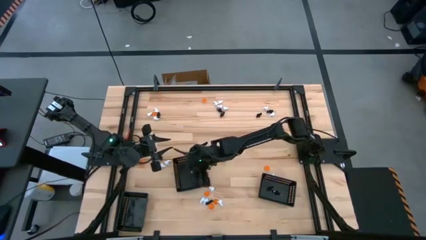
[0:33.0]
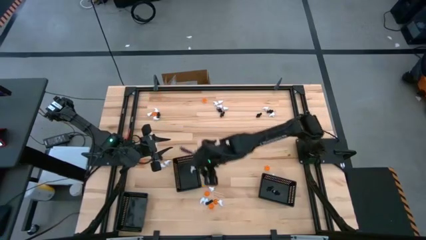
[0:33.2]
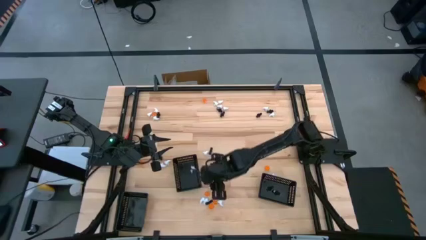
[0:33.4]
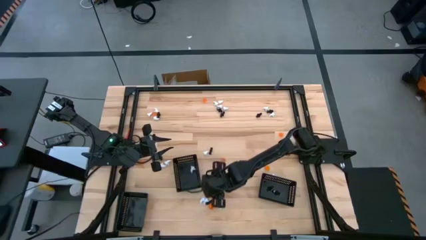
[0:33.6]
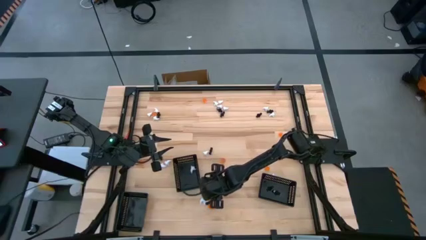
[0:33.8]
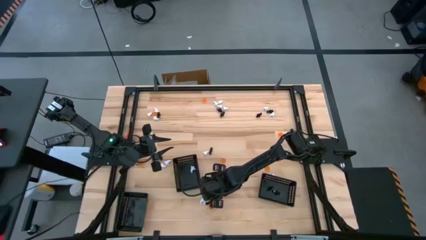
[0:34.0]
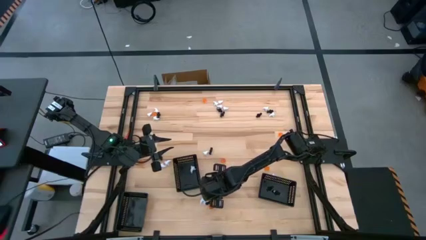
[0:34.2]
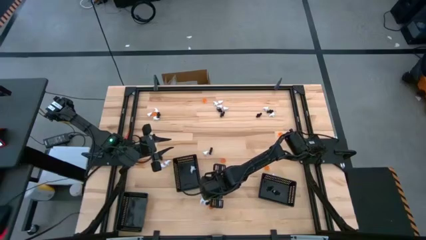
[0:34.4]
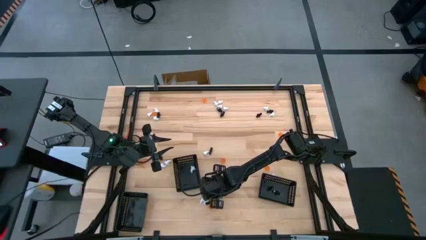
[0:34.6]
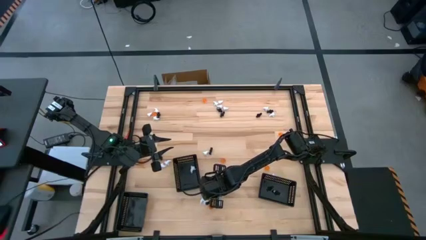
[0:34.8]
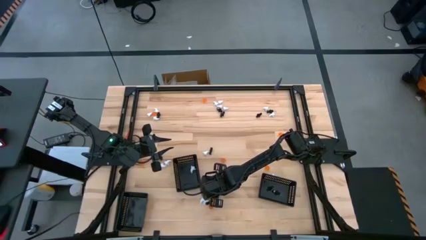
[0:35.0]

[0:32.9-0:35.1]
Task: Sort Halloween decoration
Put the white ghost toy into the middle black basket

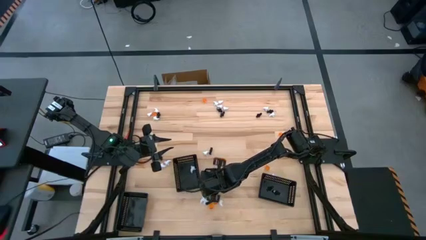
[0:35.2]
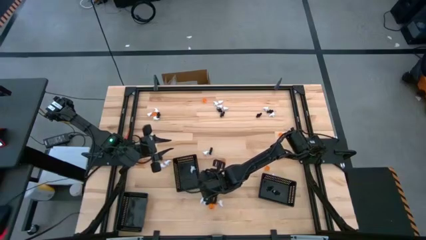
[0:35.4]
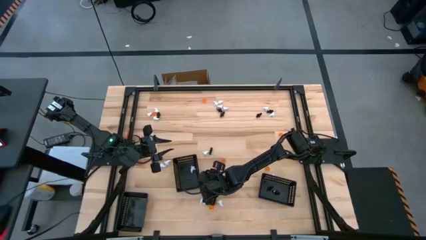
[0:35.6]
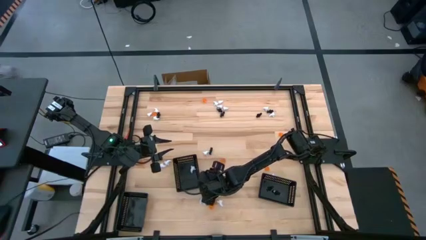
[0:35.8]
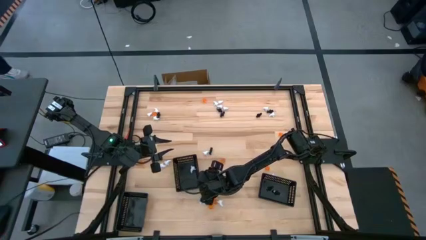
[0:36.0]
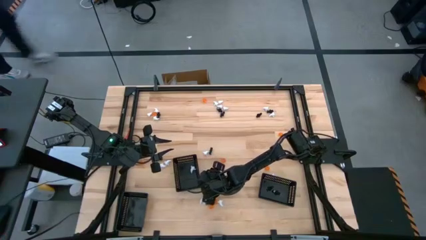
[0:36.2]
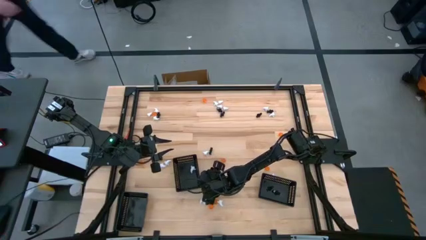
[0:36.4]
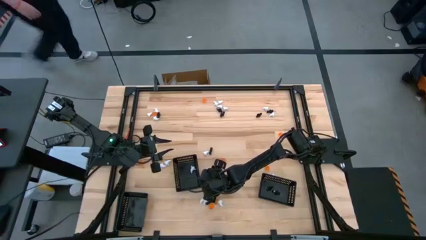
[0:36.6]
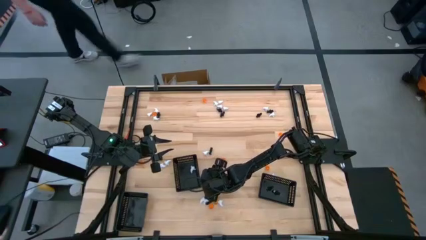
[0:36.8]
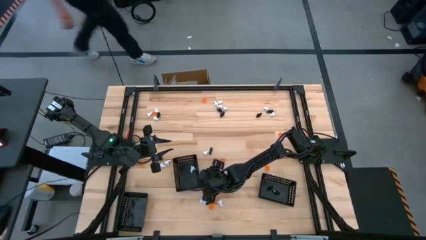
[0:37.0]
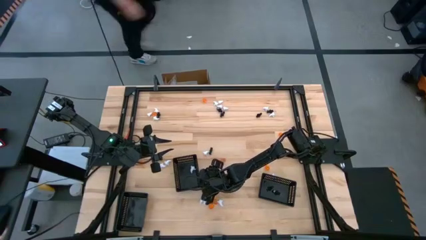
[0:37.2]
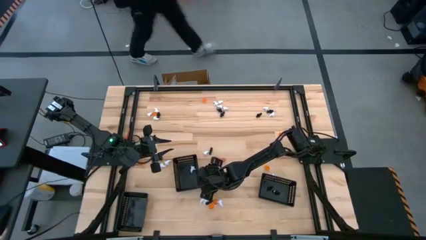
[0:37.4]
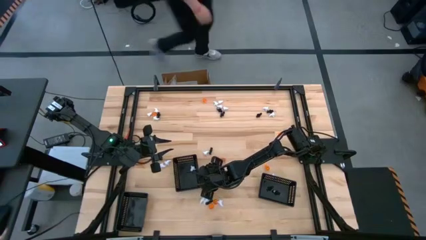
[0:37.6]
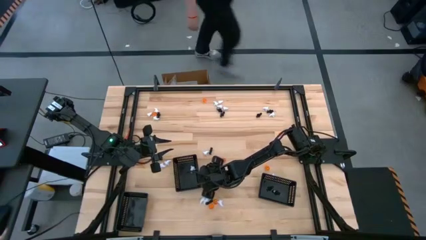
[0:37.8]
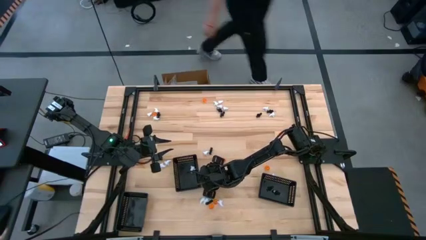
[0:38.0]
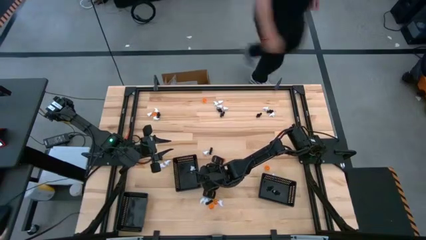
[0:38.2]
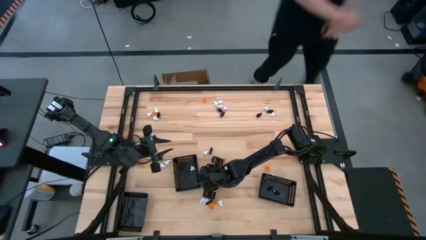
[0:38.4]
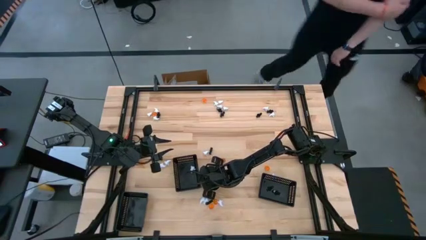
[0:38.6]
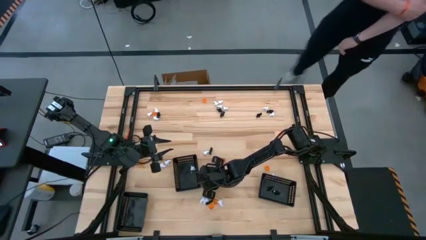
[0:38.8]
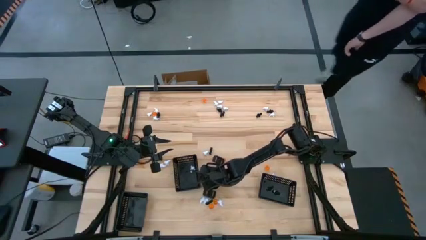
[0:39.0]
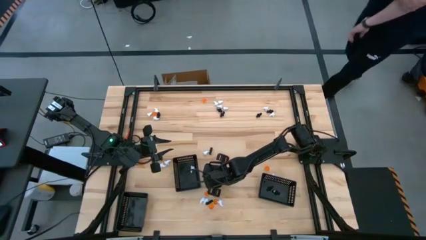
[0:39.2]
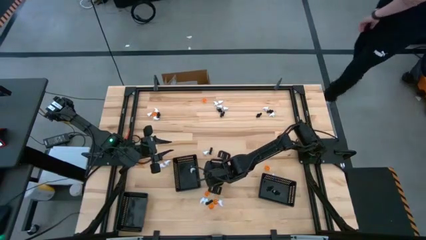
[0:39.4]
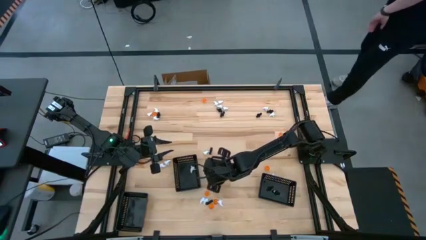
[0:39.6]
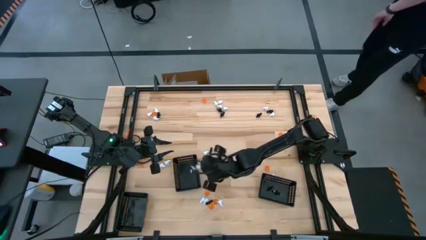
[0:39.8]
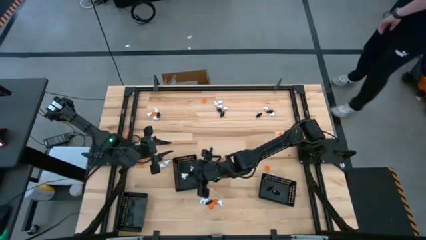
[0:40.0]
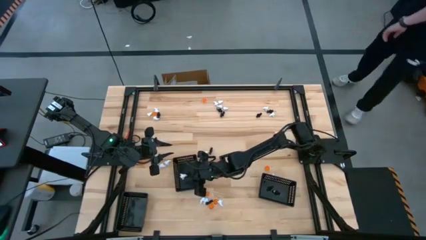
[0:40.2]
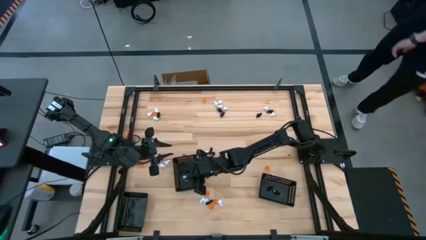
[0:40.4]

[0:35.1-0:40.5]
Put the white ghost toy into the middle black basket

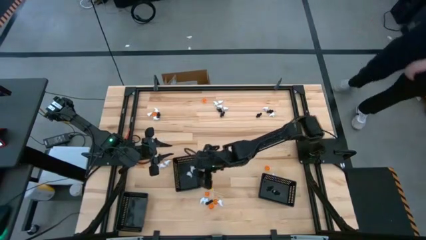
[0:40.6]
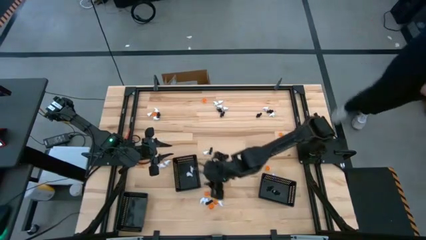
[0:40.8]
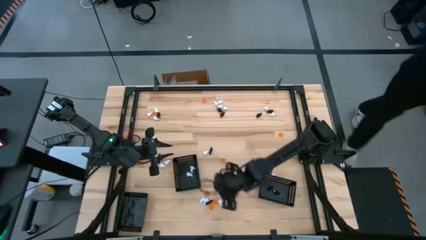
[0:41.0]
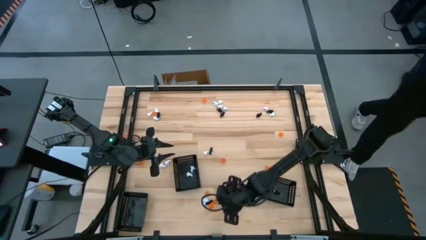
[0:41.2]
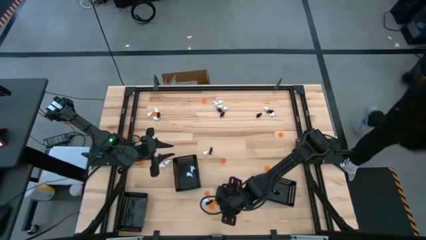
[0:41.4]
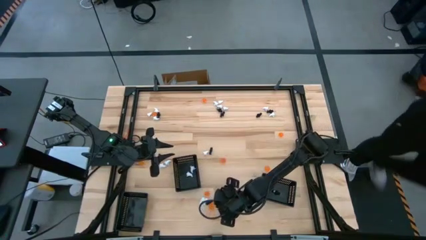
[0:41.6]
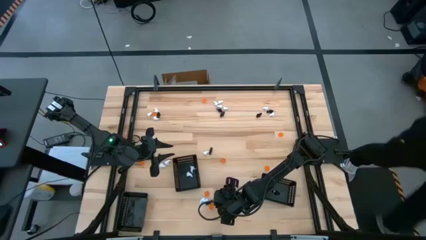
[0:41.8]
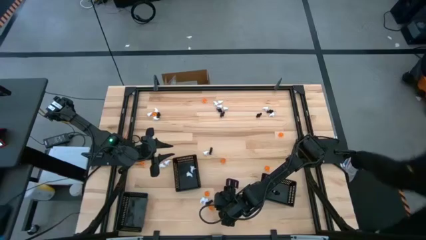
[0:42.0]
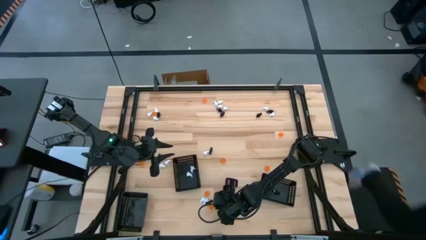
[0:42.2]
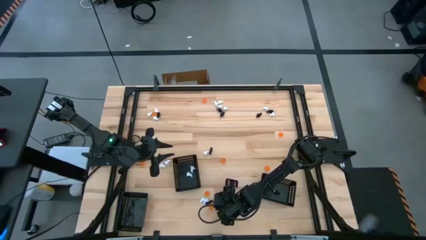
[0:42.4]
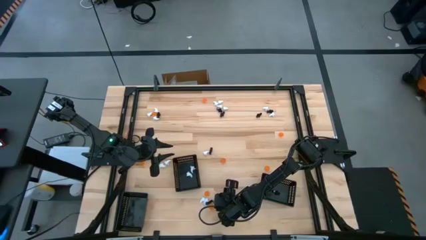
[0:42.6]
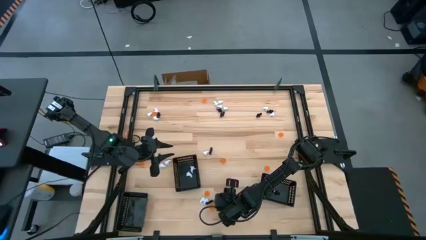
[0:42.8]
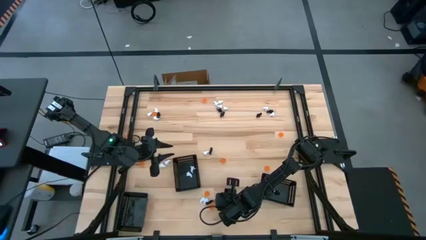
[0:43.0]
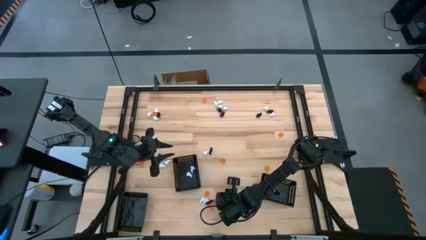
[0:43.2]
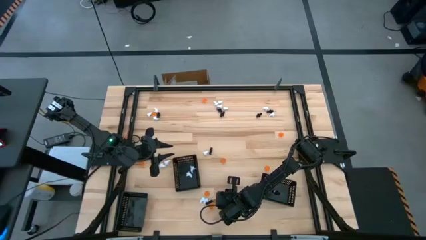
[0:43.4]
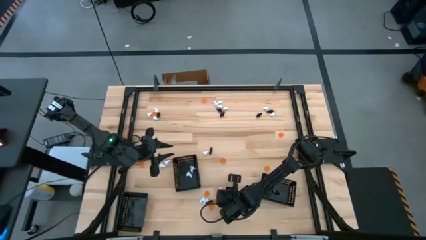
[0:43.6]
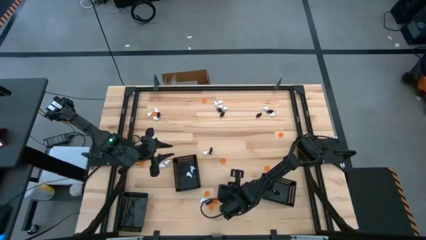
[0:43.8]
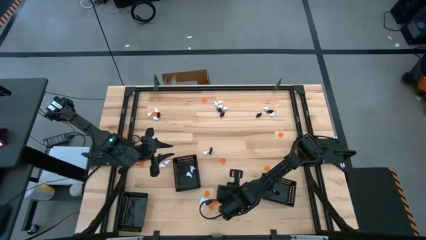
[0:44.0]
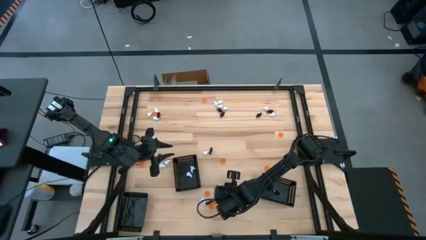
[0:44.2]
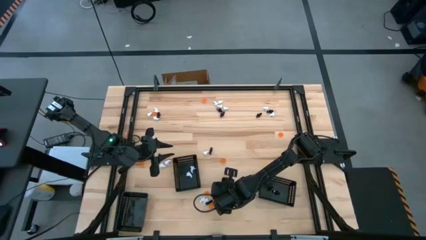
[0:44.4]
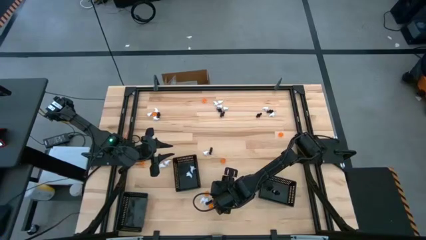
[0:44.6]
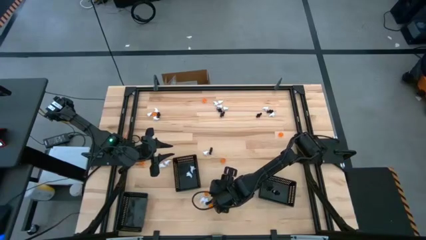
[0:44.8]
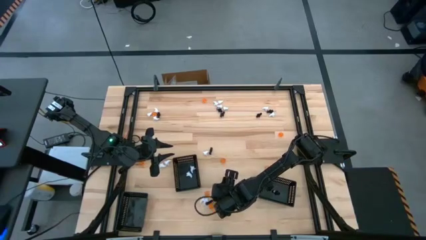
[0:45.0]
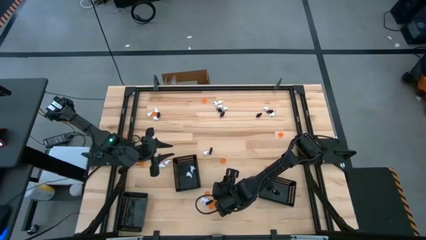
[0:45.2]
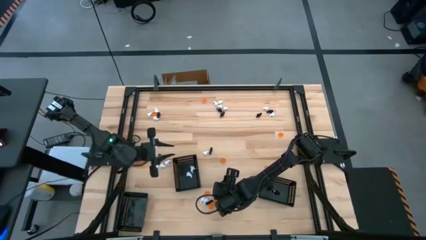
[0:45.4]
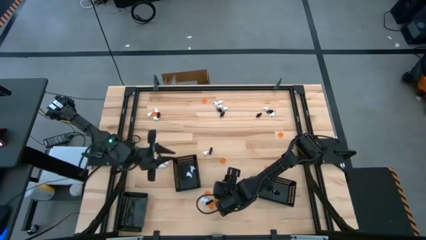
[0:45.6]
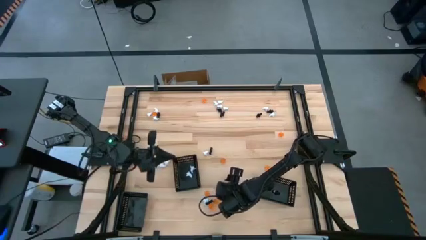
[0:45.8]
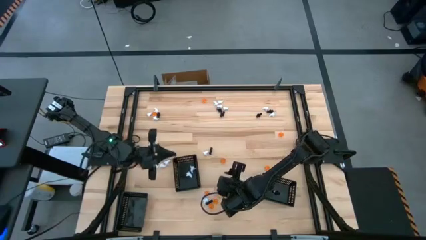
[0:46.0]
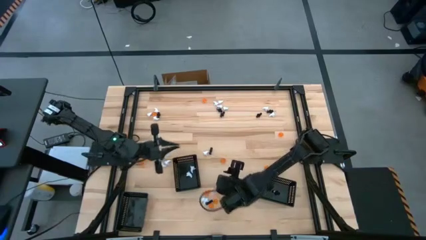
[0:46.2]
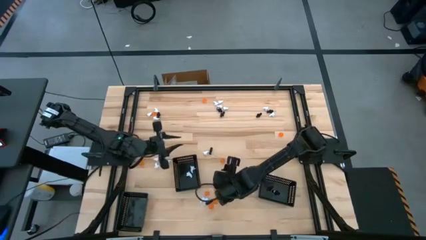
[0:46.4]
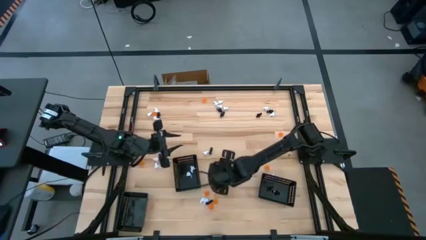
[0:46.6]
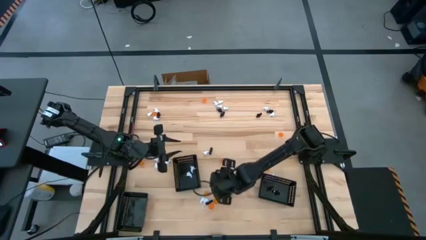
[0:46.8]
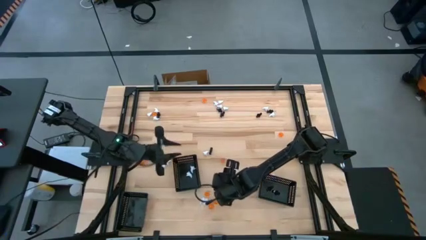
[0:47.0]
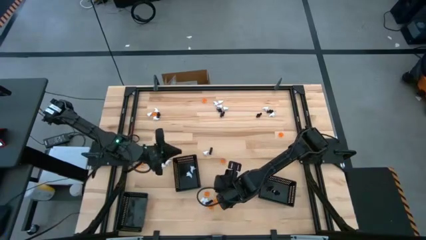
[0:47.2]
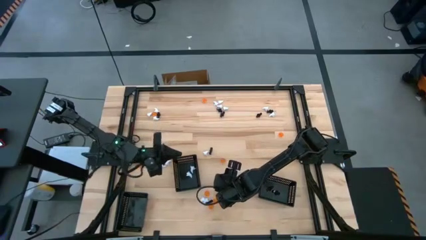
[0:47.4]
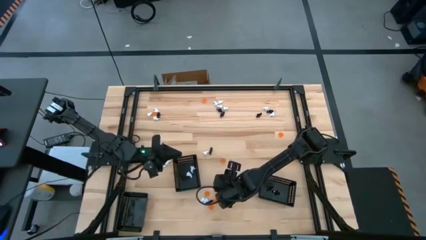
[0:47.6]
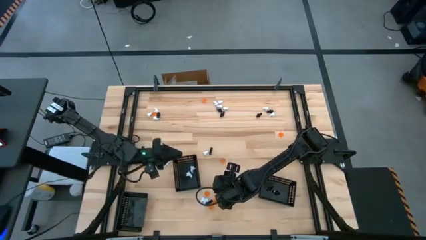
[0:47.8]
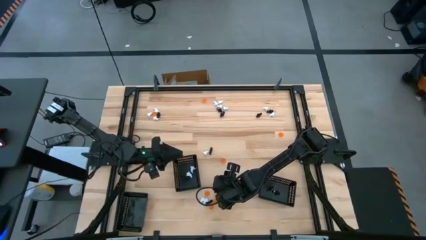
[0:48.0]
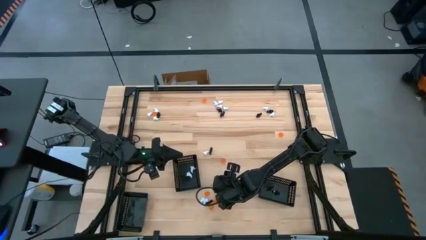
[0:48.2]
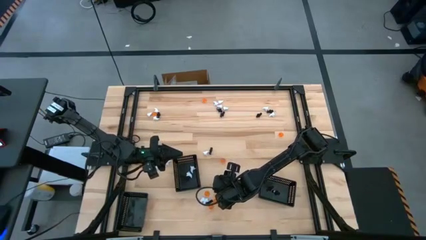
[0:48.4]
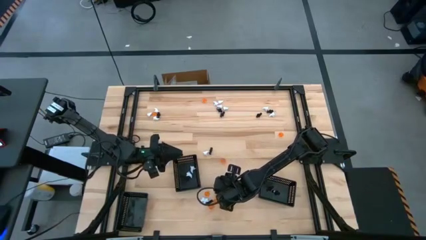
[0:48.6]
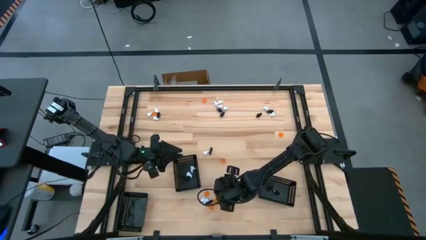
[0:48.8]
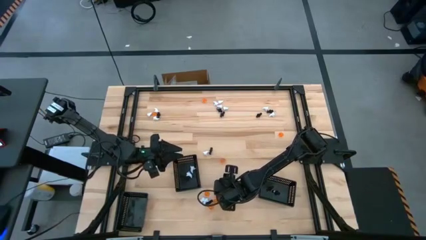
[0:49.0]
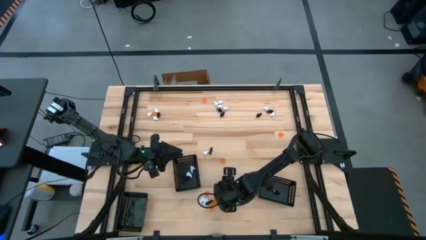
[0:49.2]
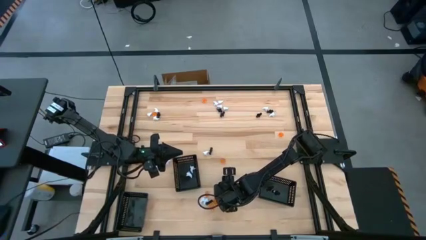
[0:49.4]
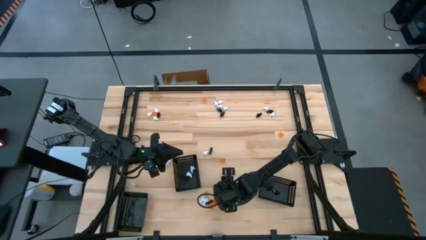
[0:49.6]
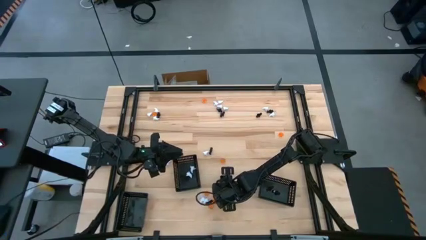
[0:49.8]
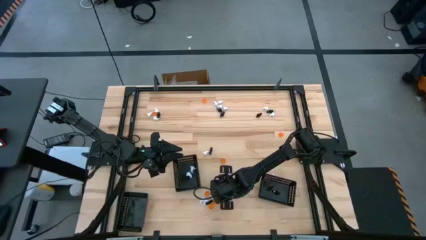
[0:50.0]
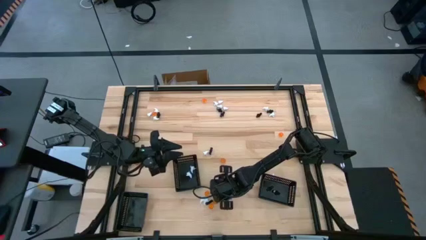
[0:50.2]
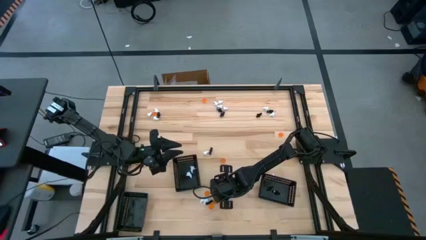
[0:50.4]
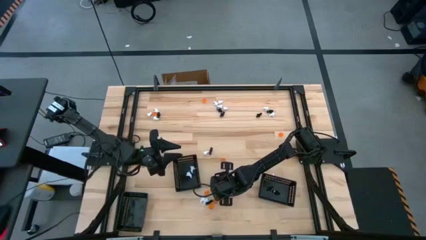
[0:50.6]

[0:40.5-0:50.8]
Put the white ghost toy into the middle black basket
